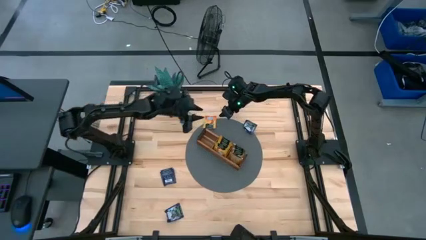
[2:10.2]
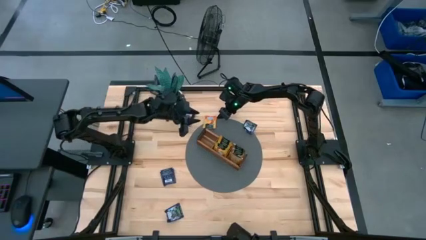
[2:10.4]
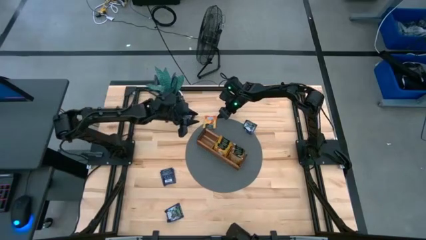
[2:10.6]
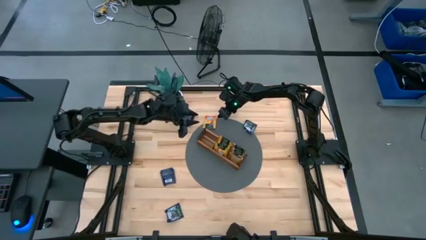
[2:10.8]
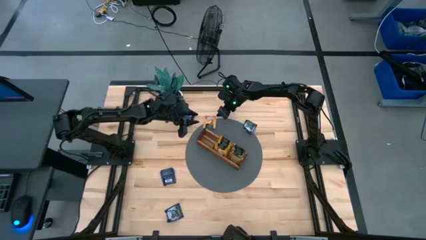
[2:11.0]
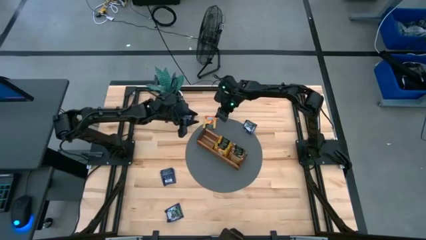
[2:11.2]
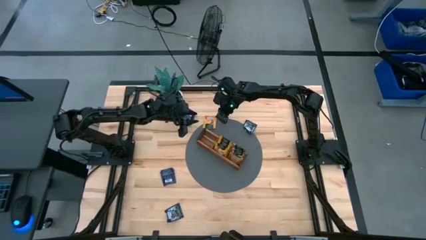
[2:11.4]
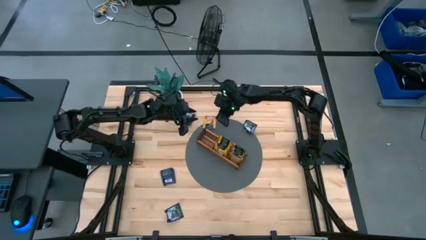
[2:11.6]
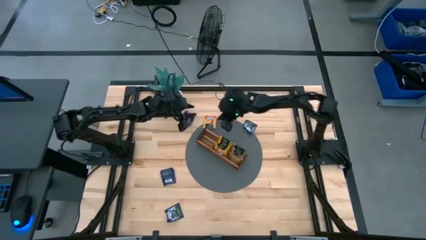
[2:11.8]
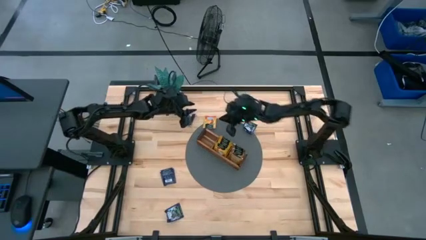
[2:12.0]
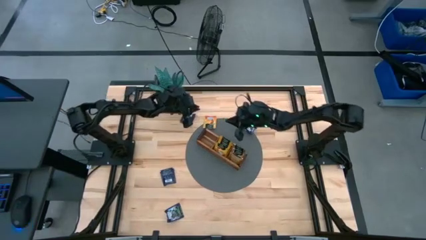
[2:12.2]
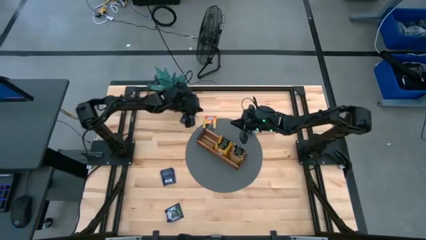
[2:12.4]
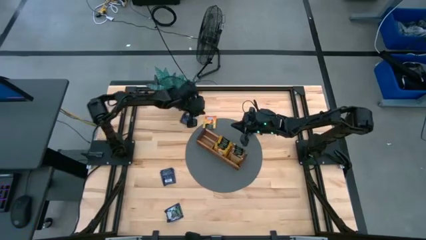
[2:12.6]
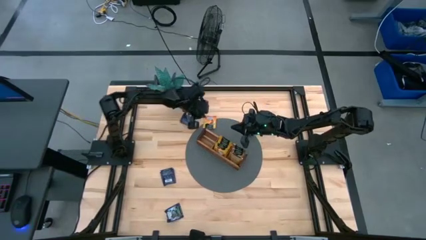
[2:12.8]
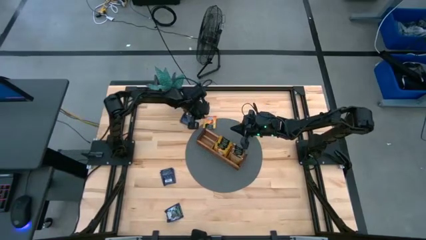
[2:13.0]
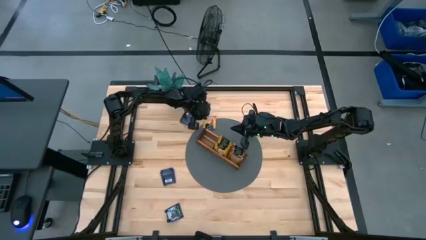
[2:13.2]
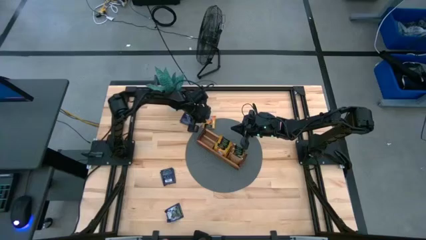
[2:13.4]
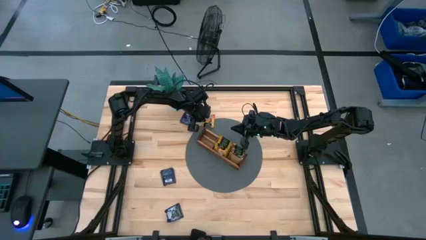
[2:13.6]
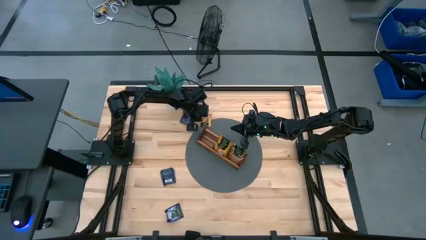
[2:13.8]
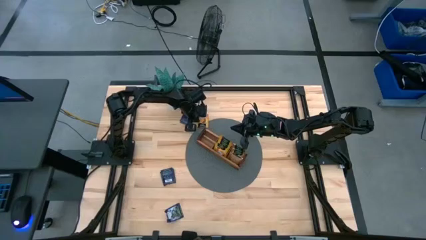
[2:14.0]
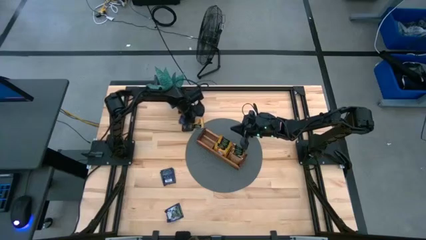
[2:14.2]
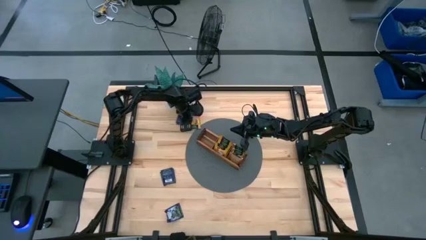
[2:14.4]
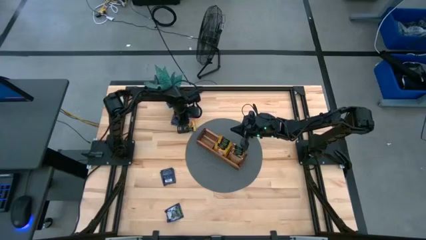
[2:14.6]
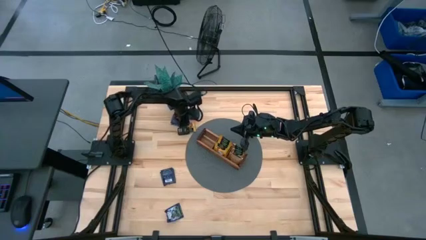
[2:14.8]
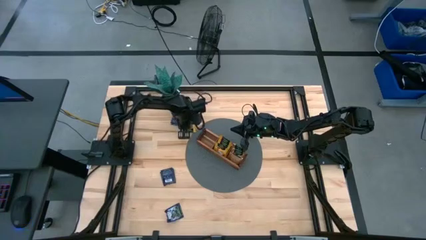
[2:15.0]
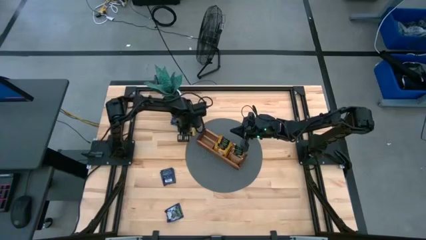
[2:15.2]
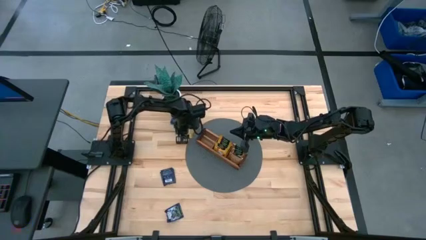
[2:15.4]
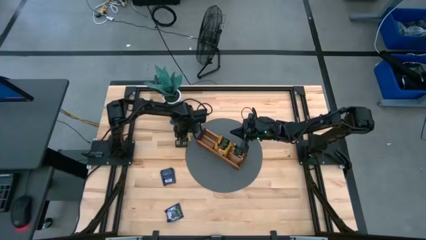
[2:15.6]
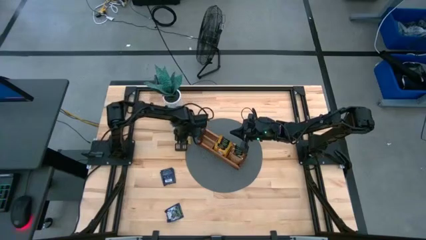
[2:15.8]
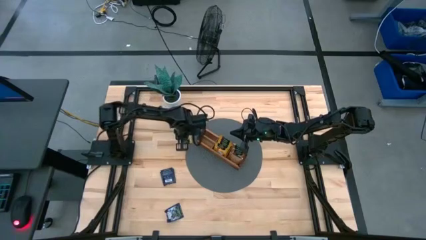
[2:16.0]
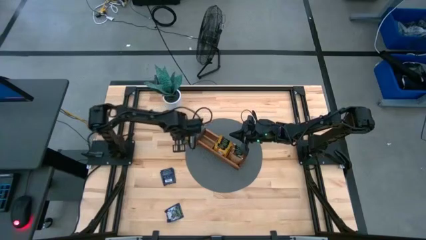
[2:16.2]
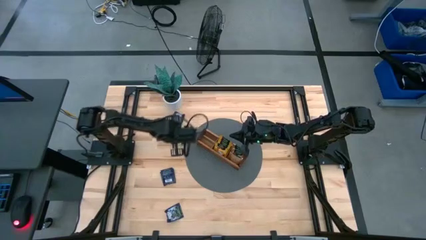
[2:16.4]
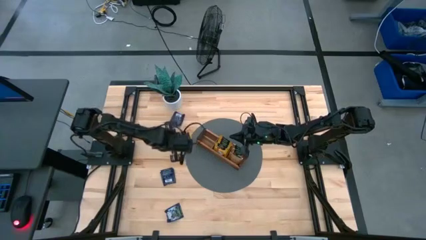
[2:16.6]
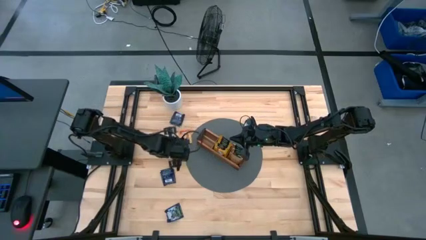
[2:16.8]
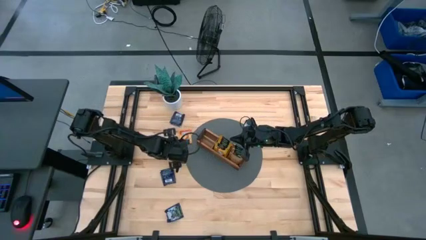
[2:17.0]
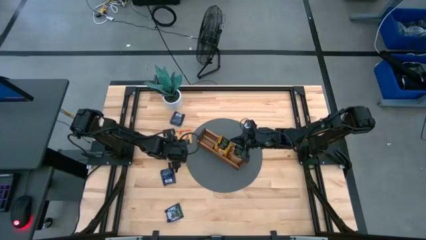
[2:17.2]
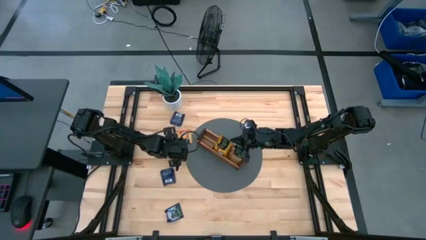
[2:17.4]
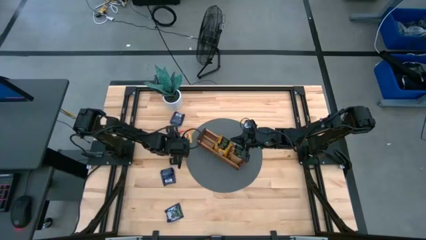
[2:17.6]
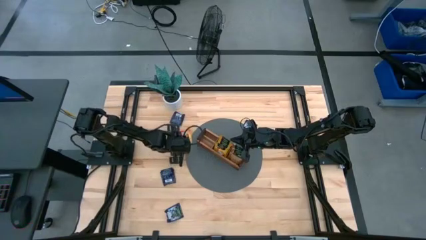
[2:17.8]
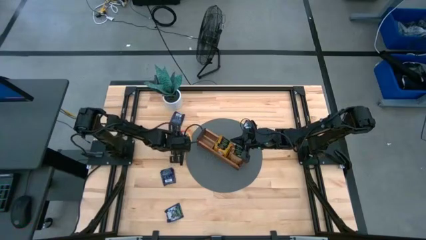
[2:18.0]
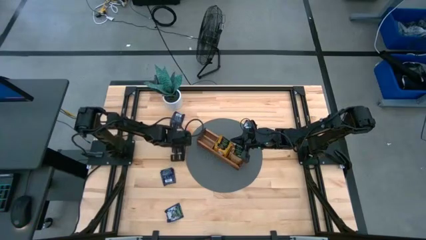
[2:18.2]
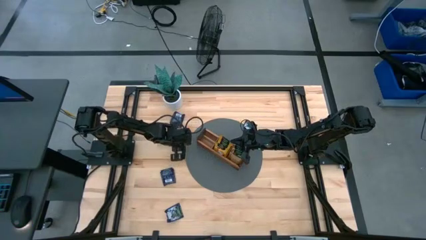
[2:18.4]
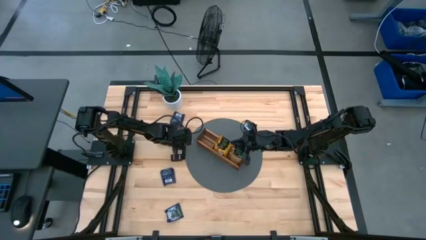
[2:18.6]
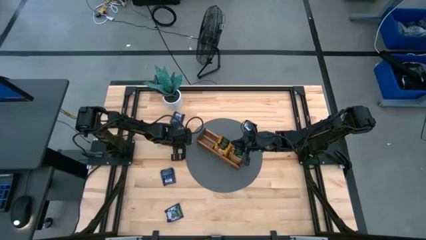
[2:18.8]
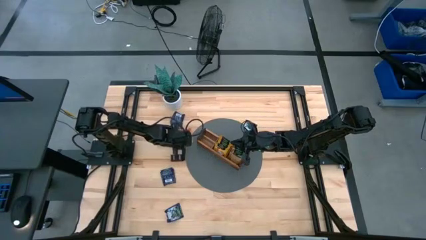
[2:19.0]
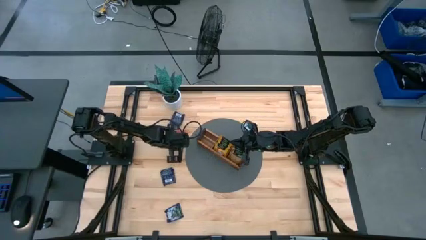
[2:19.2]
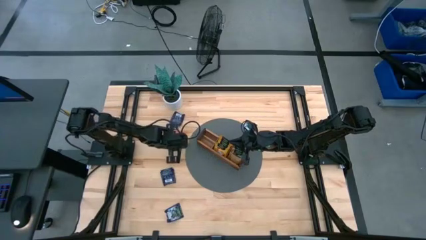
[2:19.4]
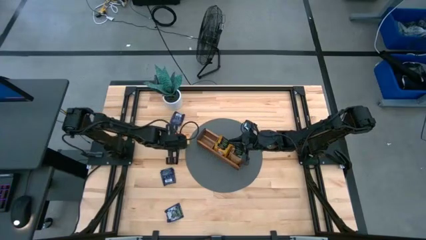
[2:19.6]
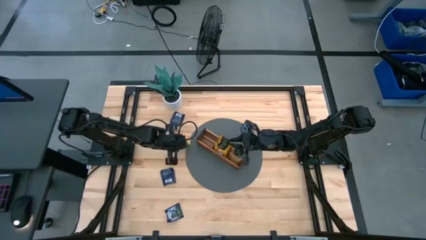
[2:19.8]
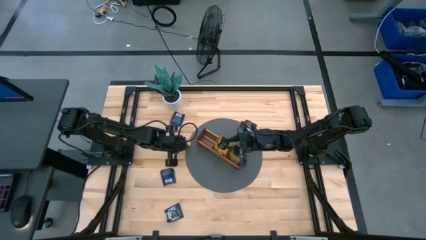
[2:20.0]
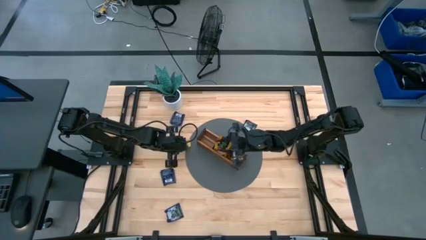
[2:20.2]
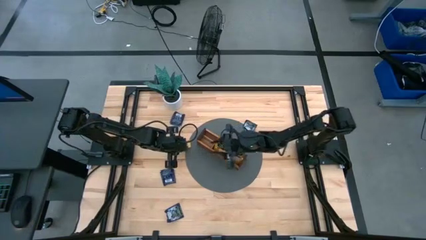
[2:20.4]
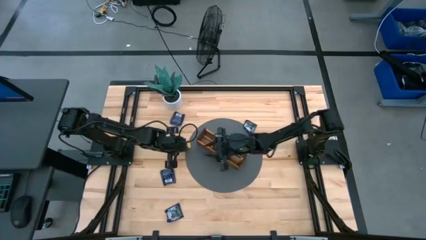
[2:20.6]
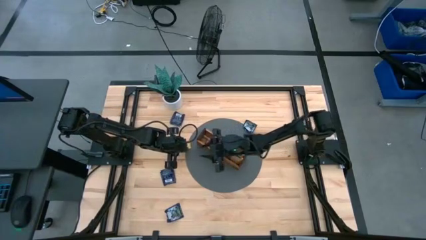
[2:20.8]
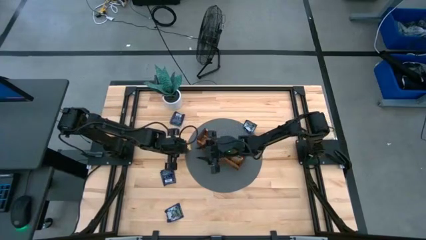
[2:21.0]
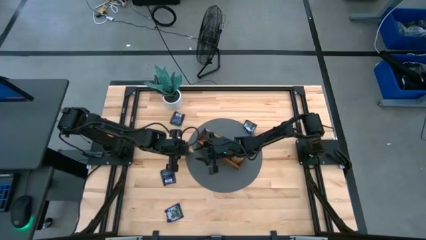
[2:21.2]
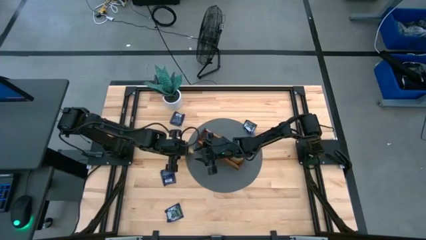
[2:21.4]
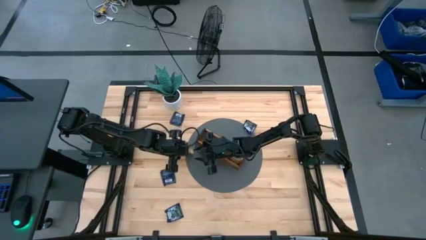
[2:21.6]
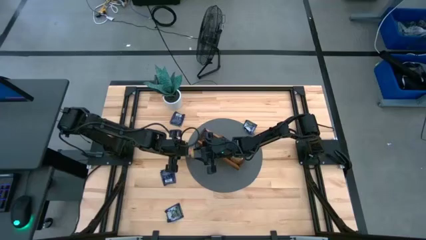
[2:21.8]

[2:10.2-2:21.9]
Task: Pick & Place Tea
Put the orange tea bag into the middle section of the wooden organizer

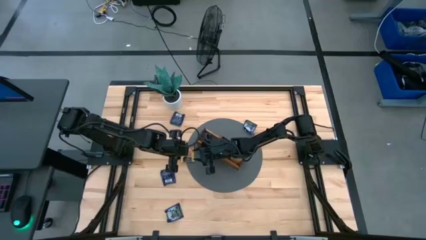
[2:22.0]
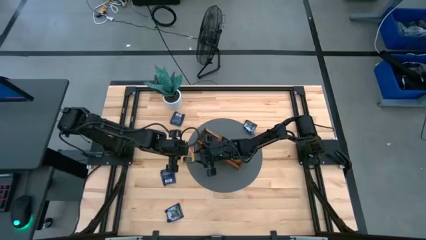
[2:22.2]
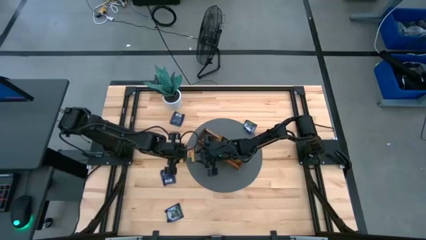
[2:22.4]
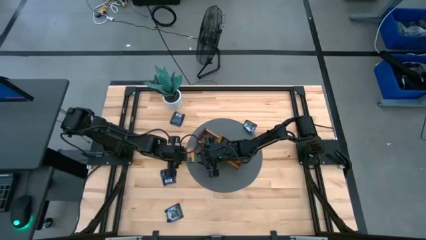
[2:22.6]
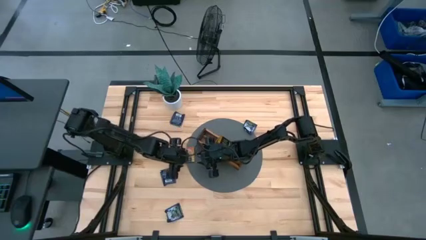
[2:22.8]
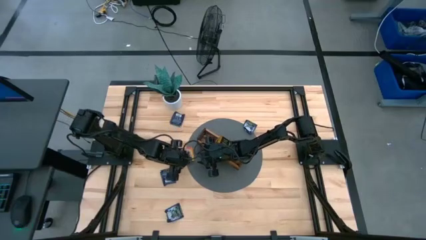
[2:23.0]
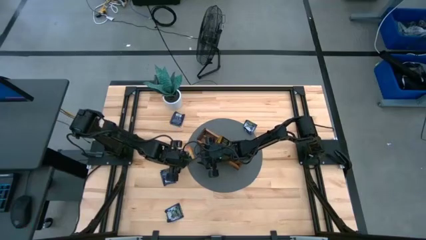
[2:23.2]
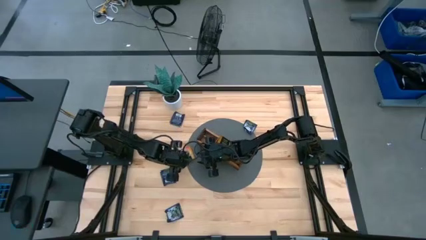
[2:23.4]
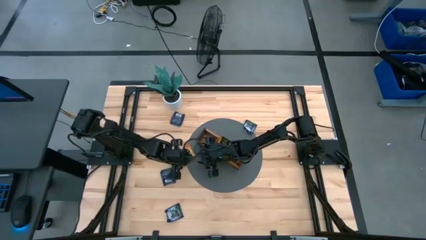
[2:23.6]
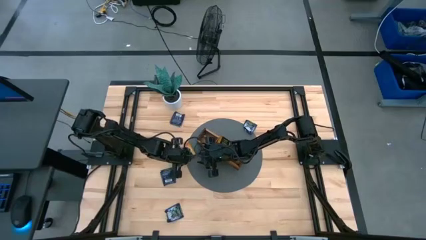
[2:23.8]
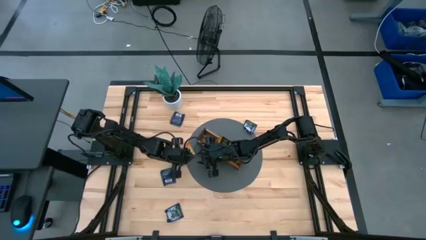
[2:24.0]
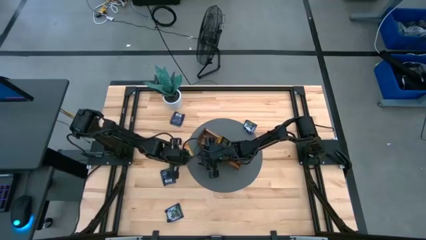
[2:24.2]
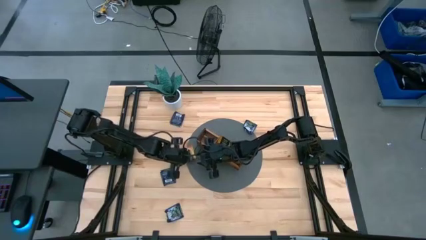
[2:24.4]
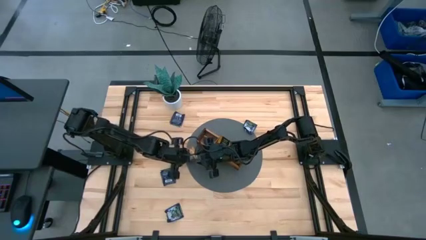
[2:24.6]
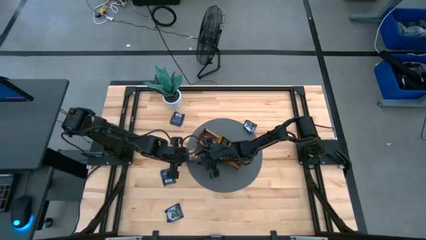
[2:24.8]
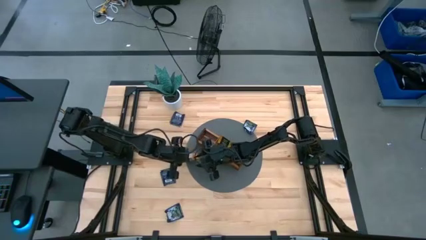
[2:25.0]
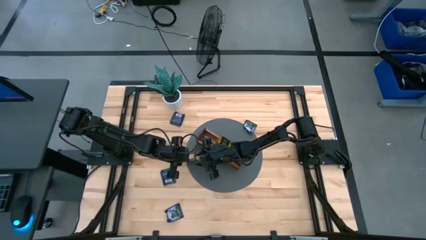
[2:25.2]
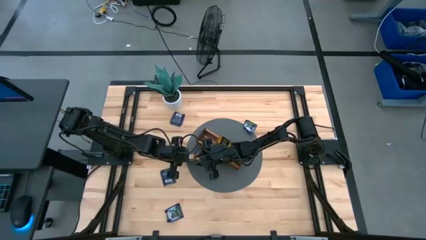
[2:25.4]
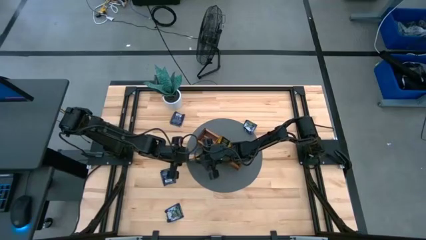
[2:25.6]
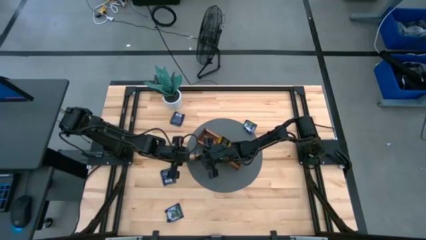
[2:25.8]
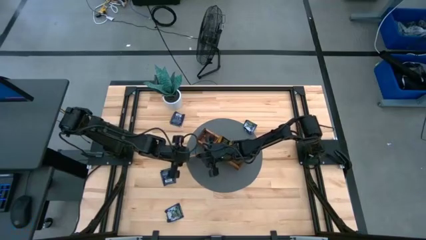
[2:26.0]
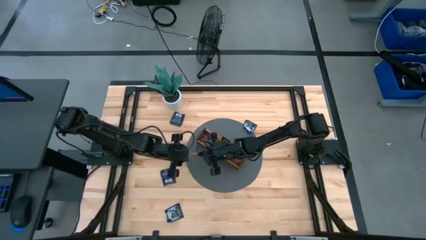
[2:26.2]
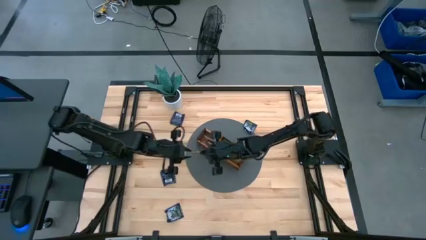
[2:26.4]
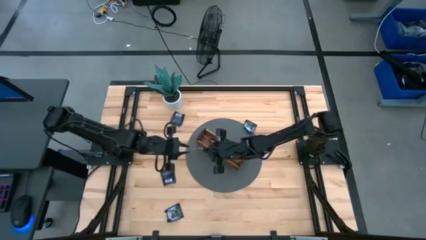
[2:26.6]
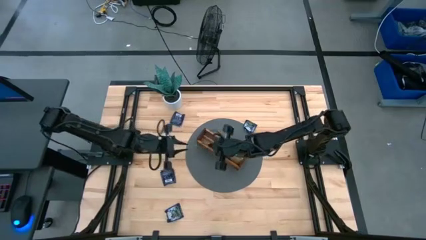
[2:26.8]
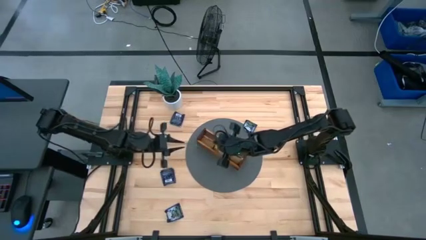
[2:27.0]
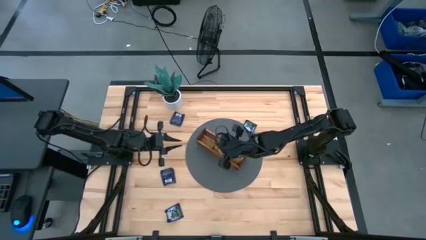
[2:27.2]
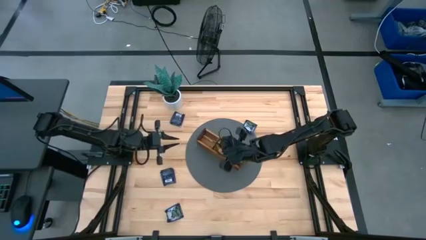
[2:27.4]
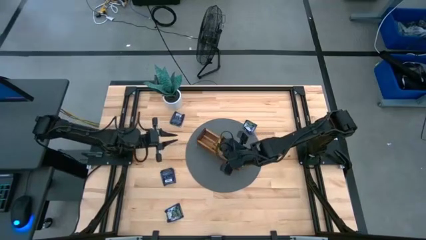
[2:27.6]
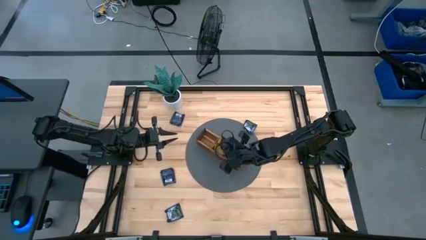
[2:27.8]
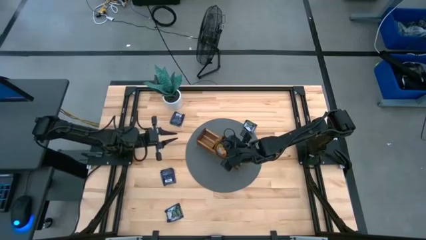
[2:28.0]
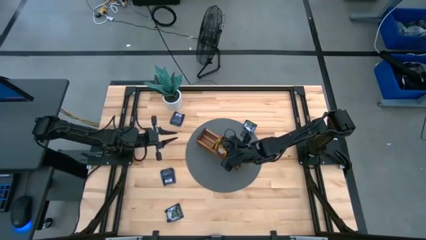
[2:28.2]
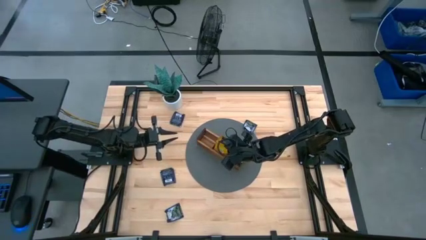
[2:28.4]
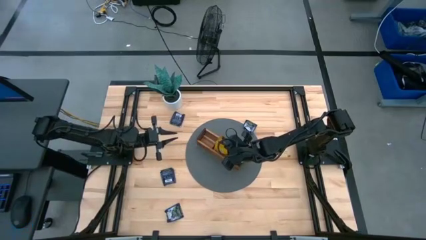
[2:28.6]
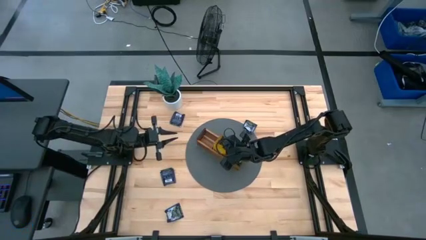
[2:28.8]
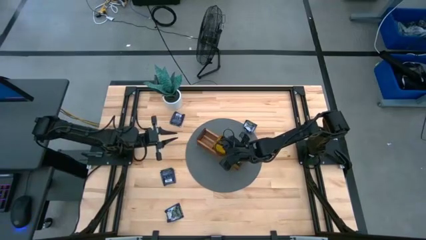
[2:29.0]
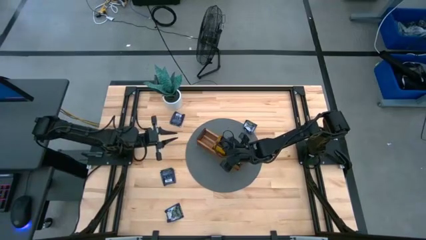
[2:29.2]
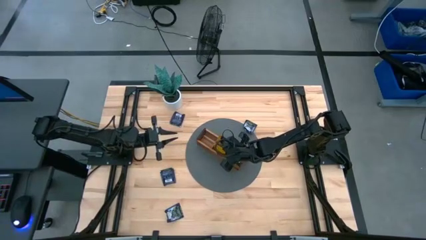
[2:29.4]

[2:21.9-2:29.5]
Put the orange tea bag into the middle section of the wooden organizer
